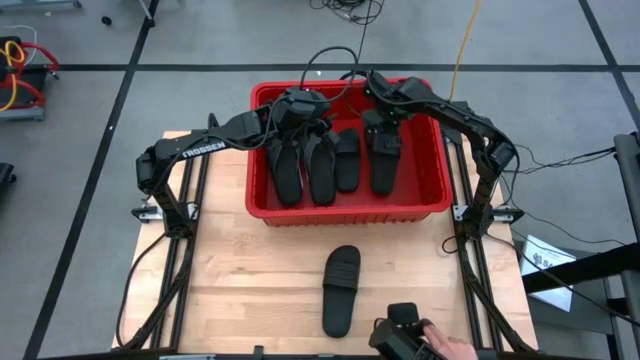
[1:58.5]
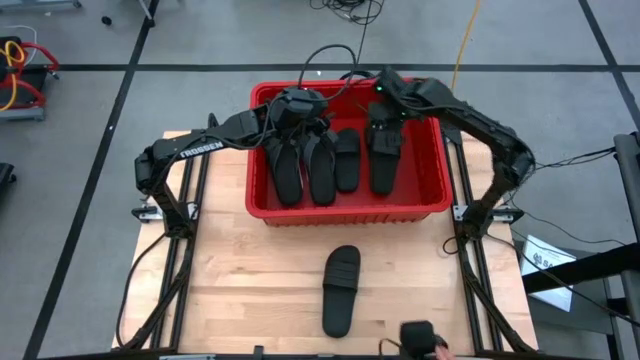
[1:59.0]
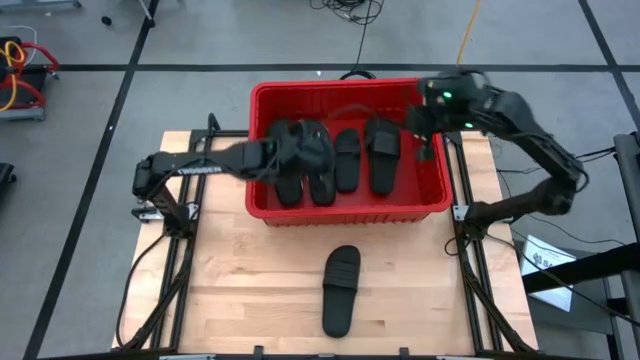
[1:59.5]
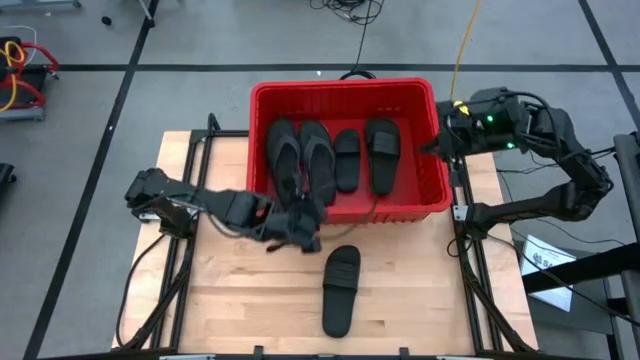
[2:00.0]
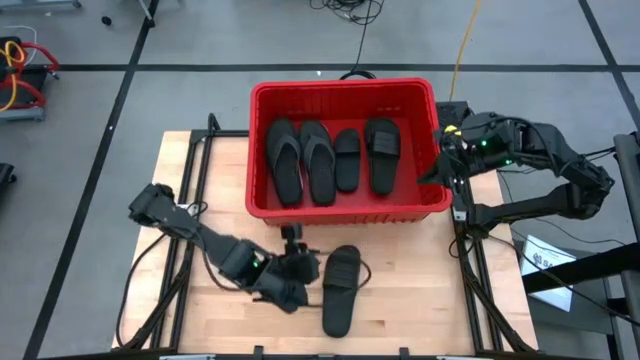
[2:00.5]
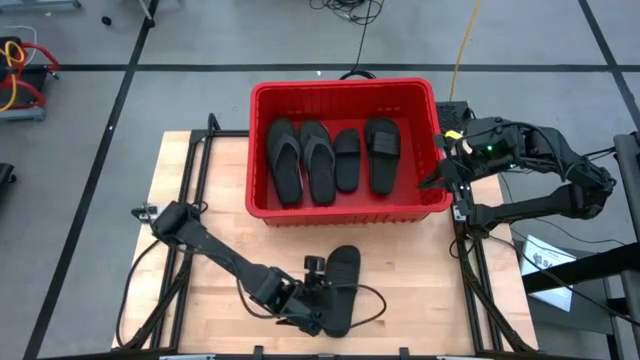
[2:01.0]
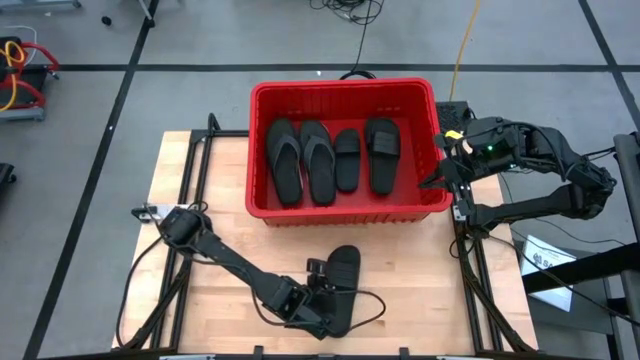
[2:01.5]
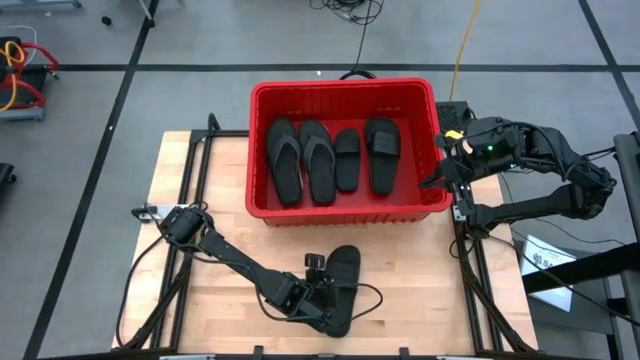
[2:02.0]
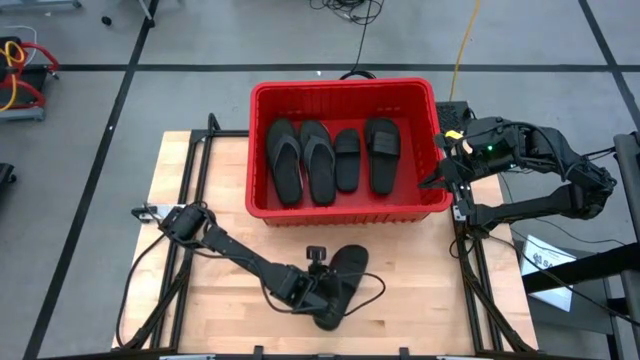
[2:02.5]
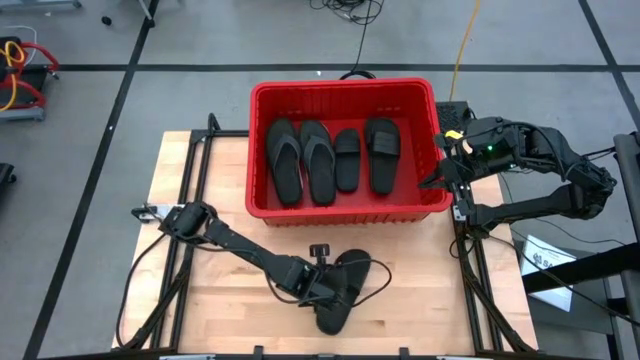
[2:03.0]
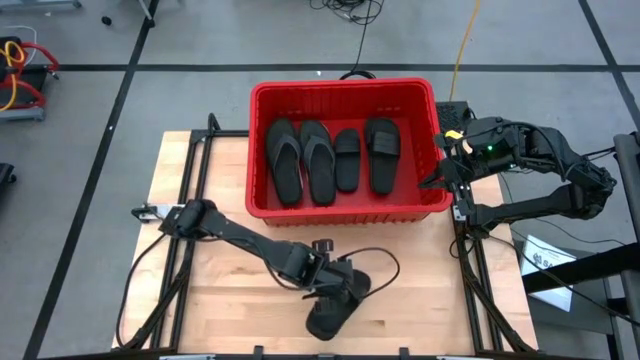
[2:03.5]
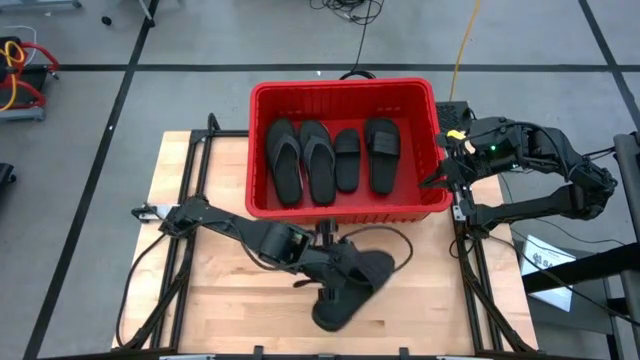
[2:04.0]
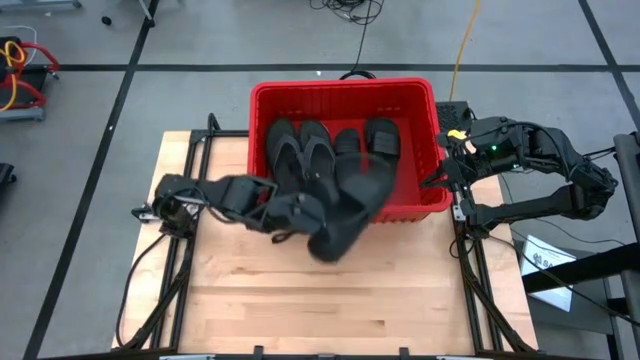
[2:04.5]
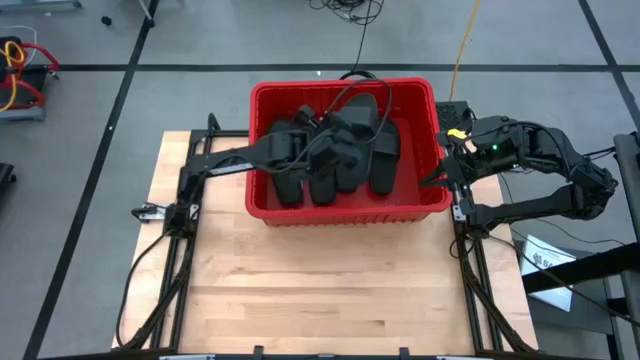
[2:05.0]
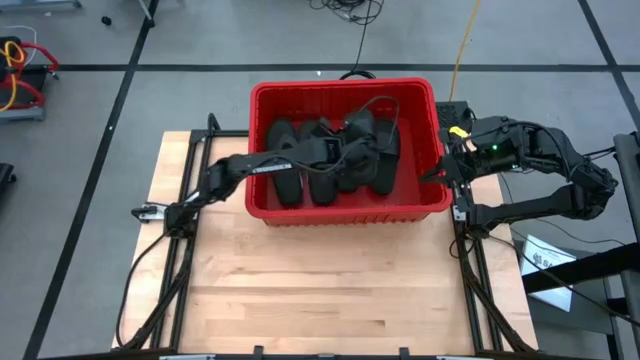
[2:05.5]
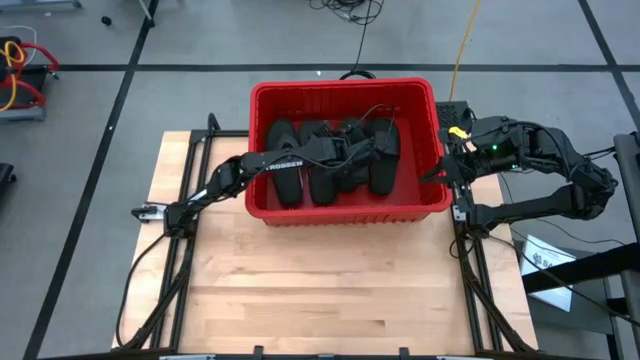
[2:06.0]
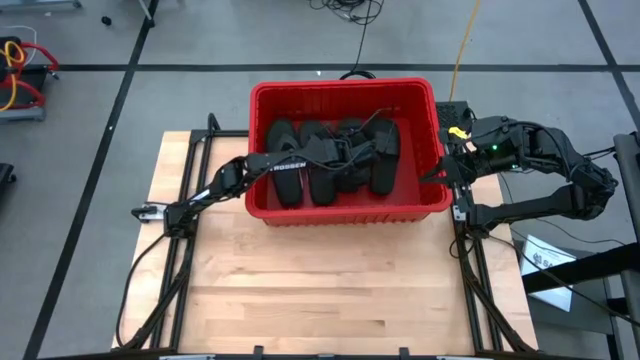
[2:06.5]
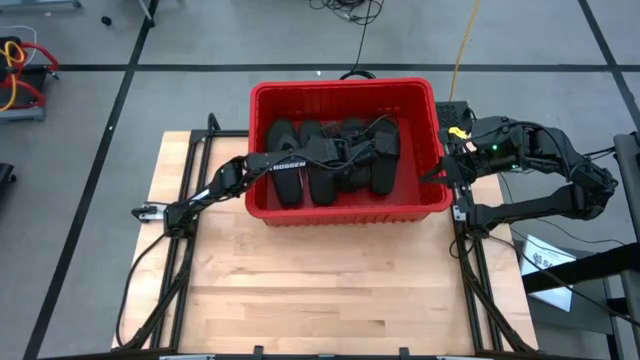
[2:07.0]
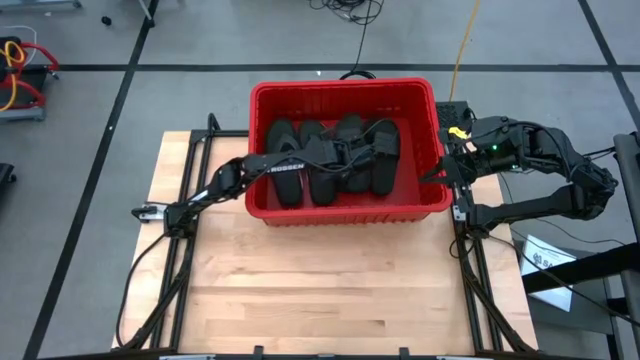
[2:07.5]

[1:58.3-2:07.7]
Task: Pick and place slides into bin
Put the black slide into the red bin

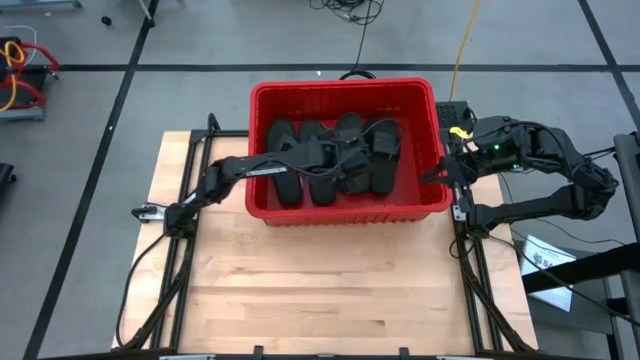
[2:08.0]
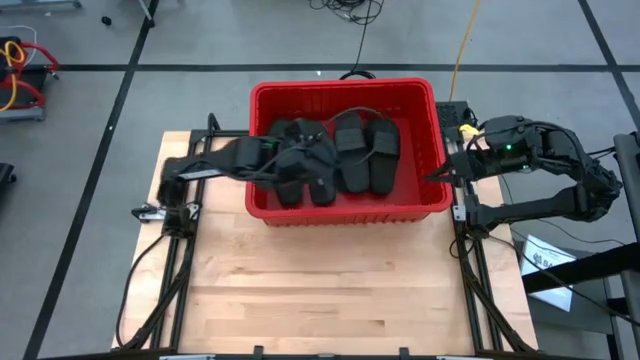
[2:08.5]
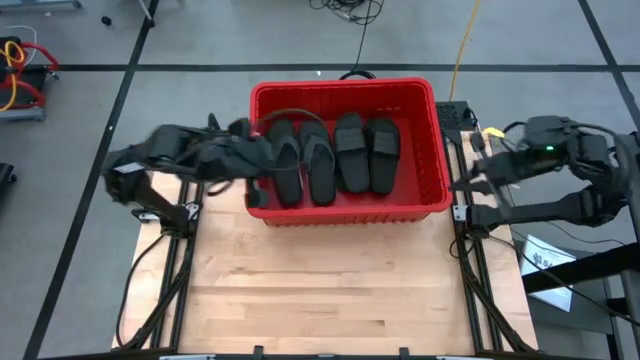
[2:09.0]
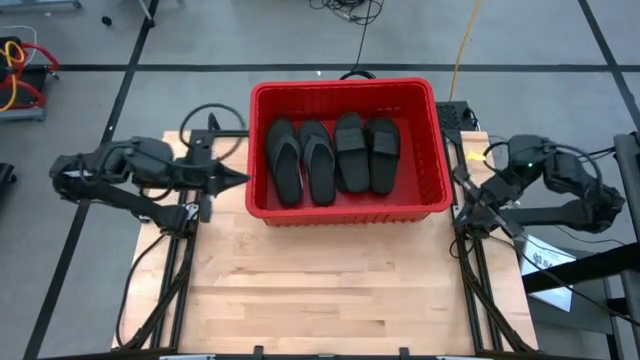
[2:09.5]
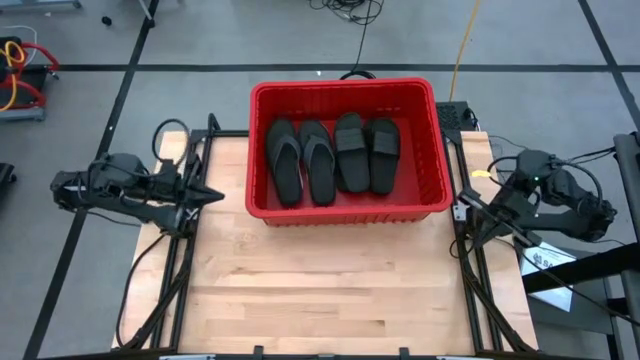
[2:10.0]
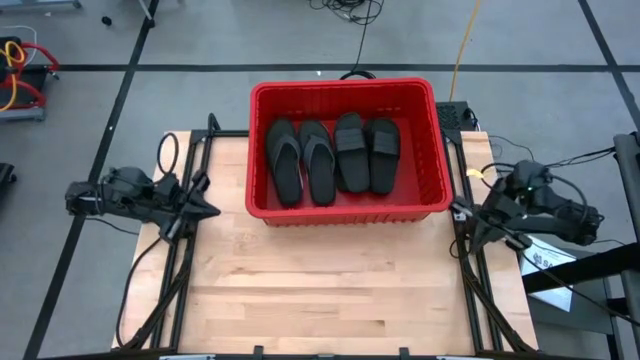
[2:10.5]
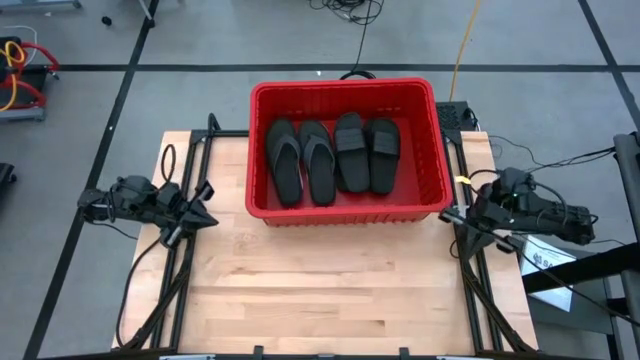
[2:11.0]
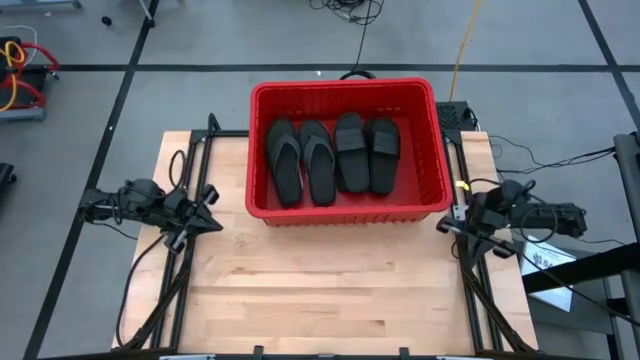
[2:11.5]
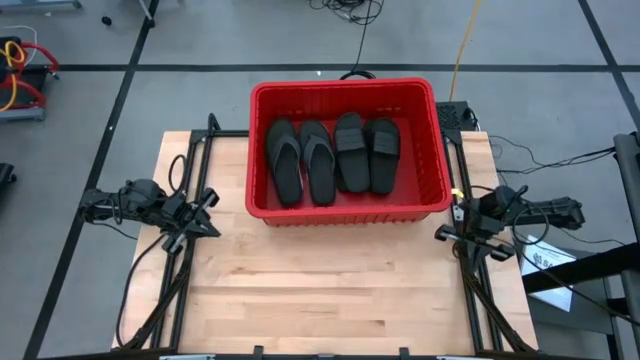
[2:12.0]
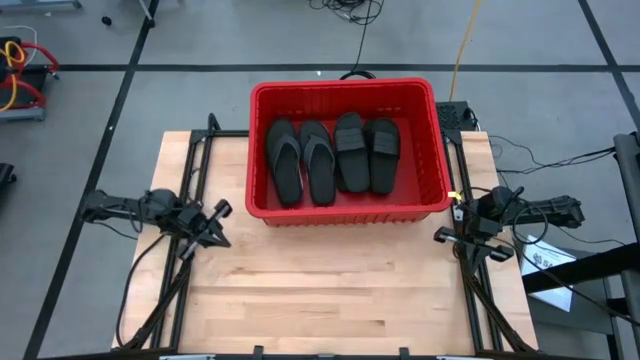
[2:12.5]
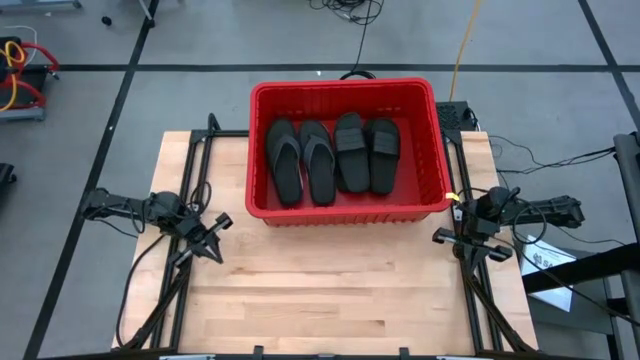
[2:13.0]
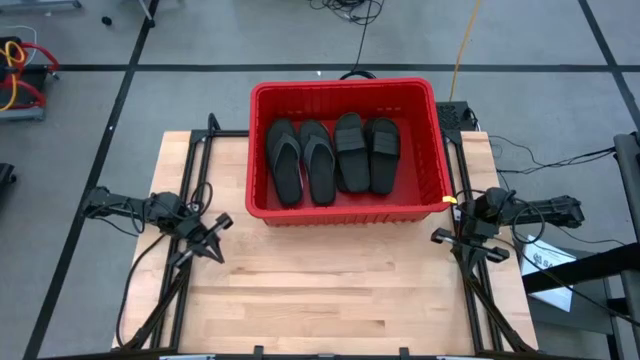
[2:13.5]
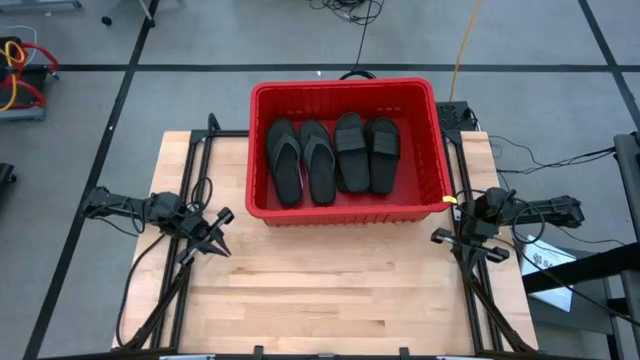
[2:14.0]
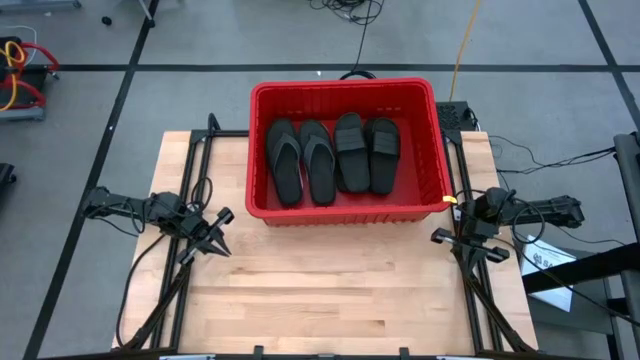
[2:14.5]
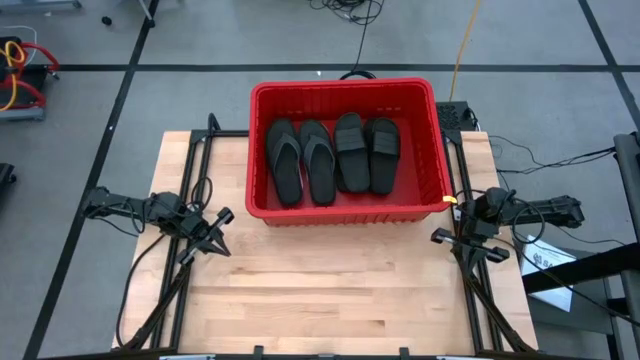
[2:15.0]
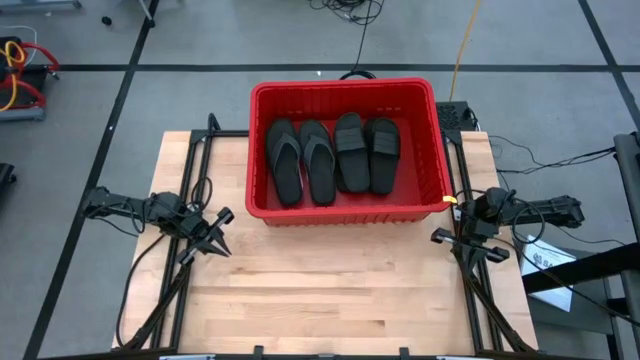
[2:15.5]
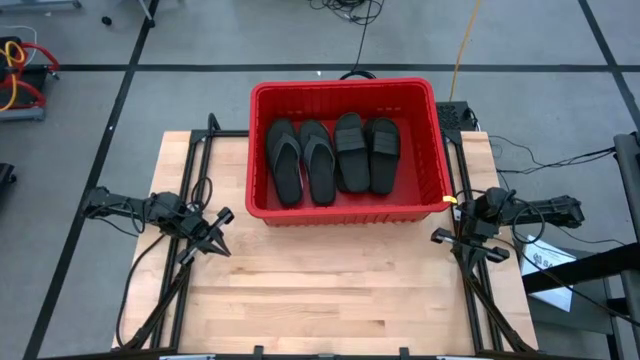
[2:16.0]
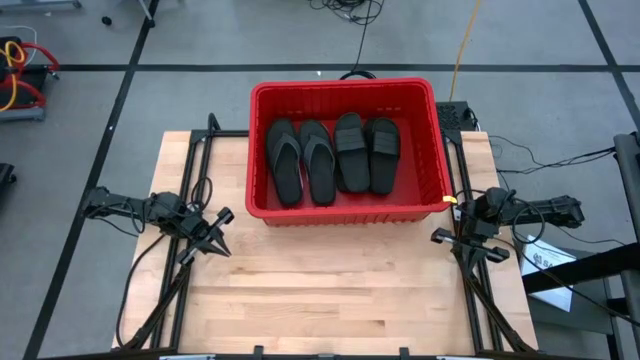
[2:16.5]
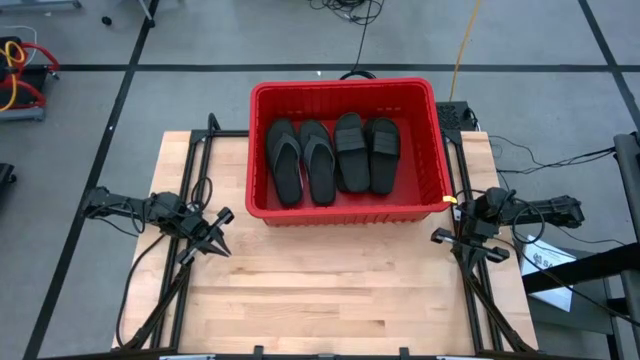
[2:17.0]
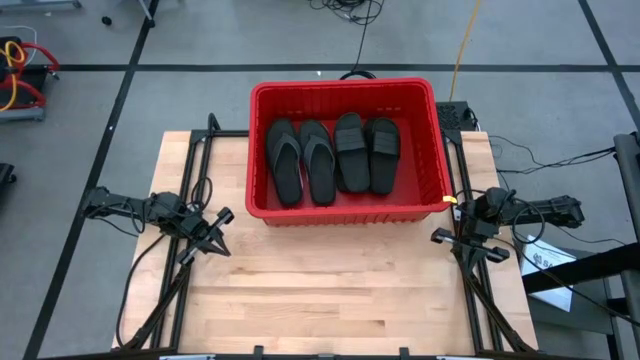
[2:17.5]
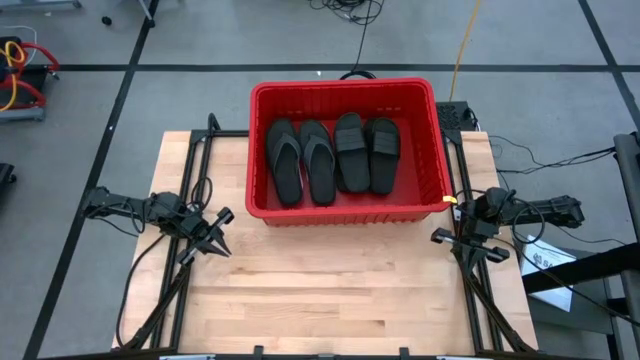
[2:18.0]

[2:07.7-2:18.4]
Return to Home Position

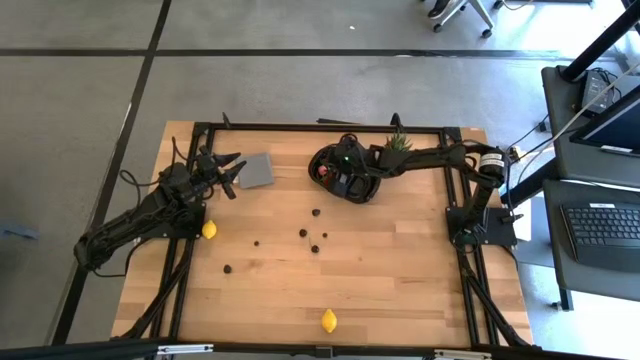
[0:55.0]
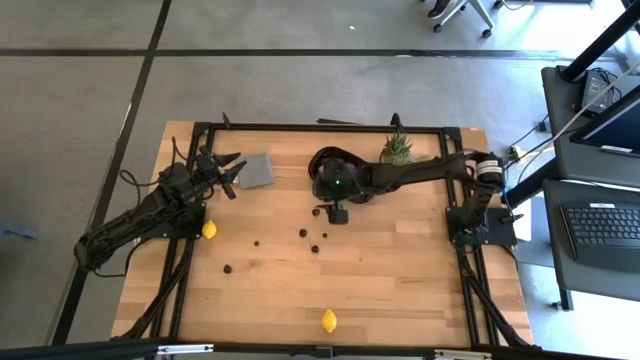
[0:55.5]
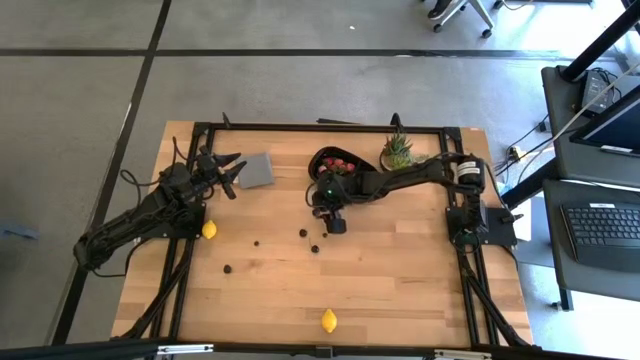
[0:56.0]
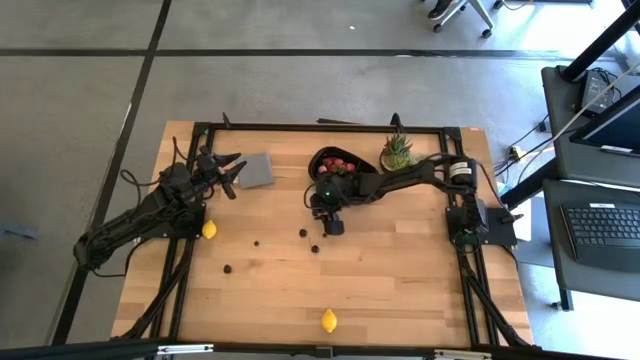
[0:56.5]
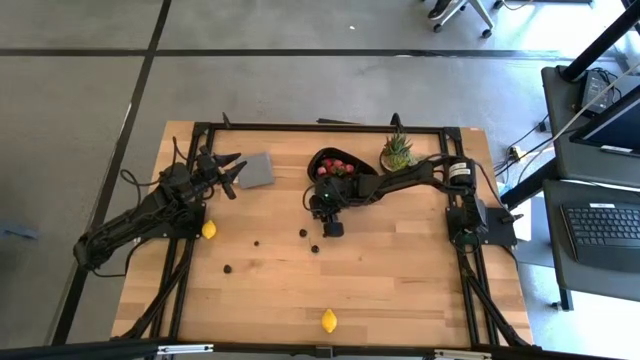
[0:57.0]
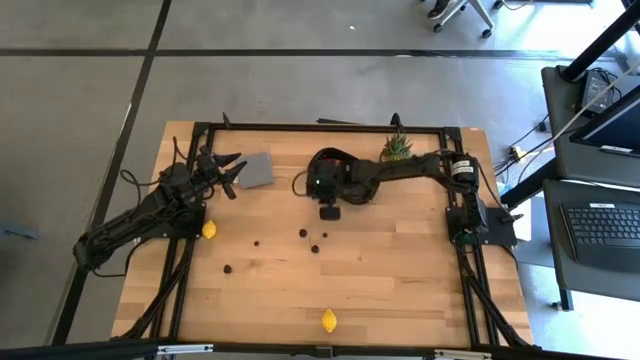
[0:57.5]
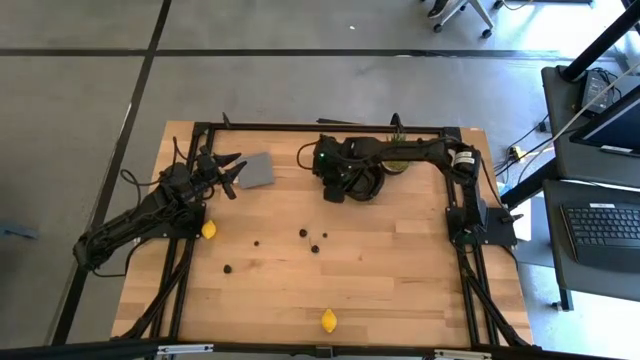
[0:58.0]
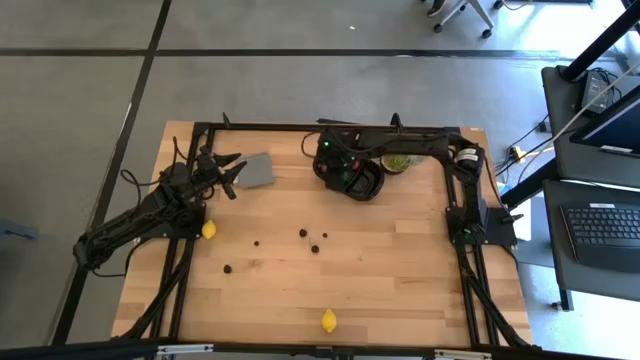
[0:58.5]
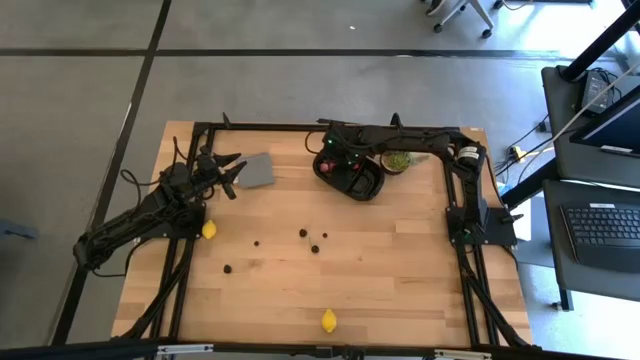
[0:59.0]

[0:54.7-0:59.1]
Task: Pick and placing Produce into tupperware
Put the top blackberry into the black bin
